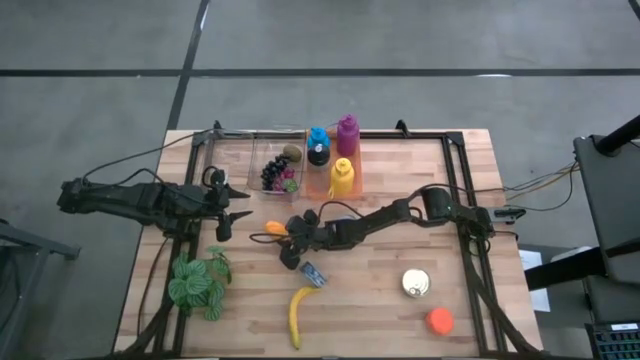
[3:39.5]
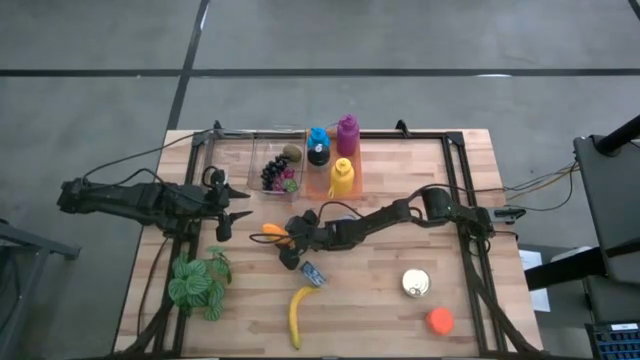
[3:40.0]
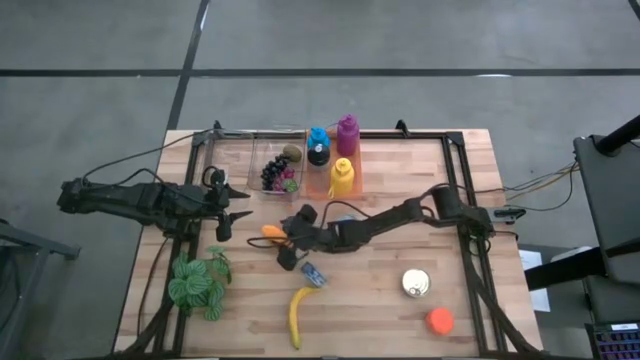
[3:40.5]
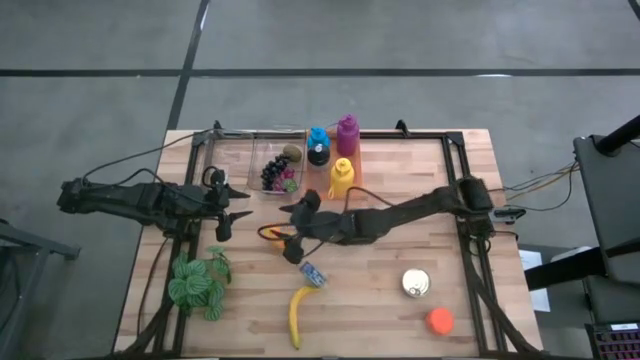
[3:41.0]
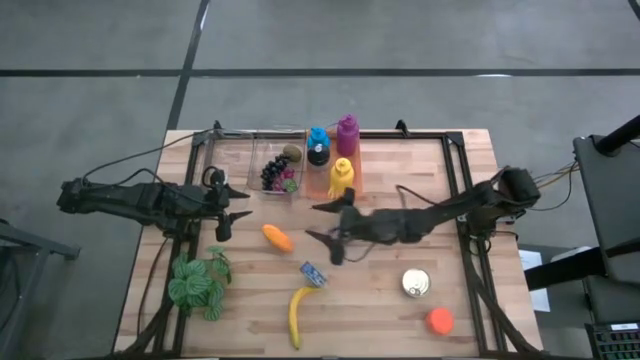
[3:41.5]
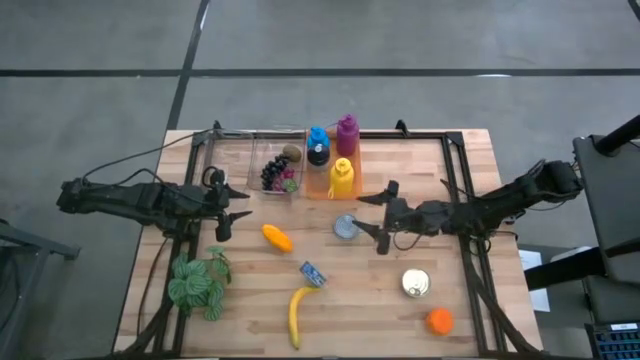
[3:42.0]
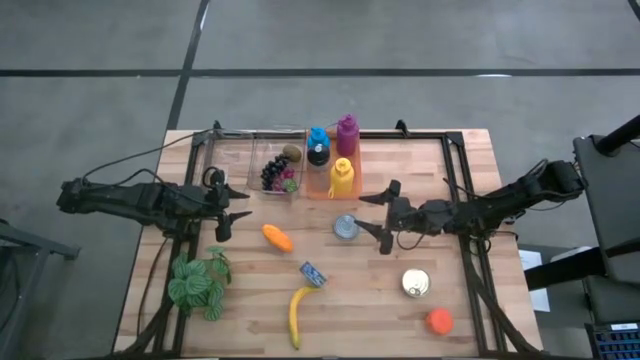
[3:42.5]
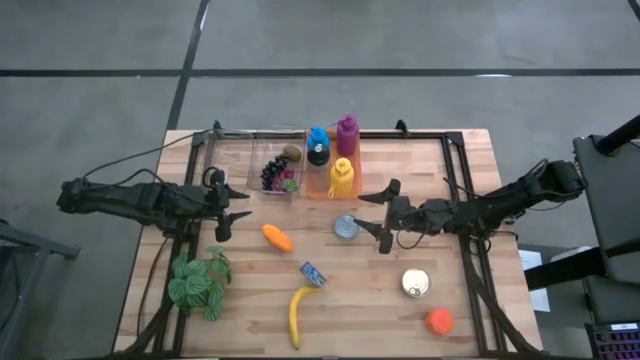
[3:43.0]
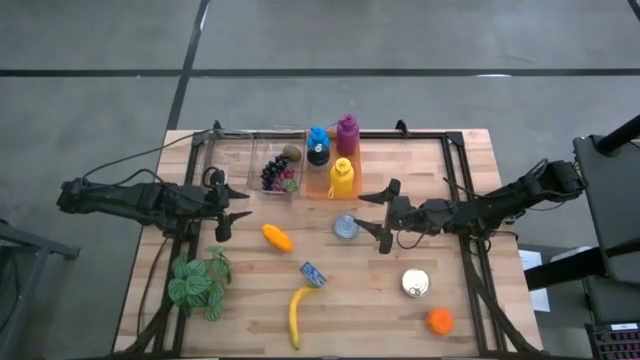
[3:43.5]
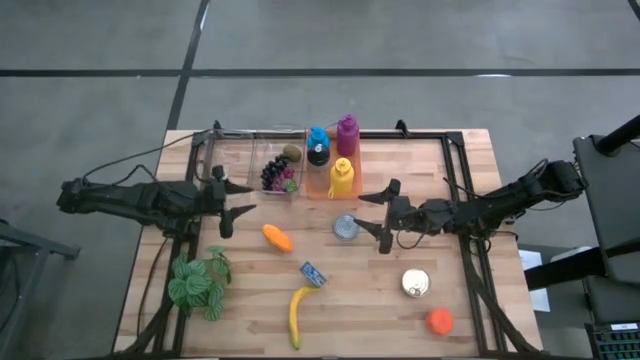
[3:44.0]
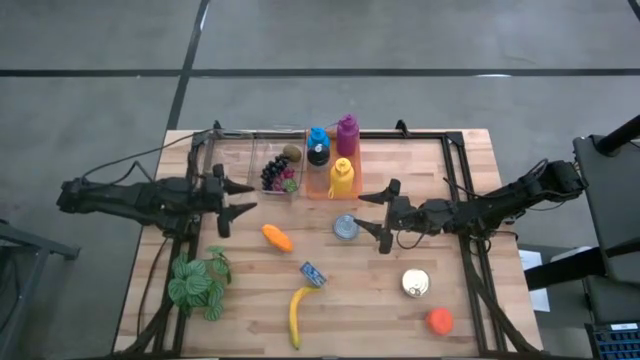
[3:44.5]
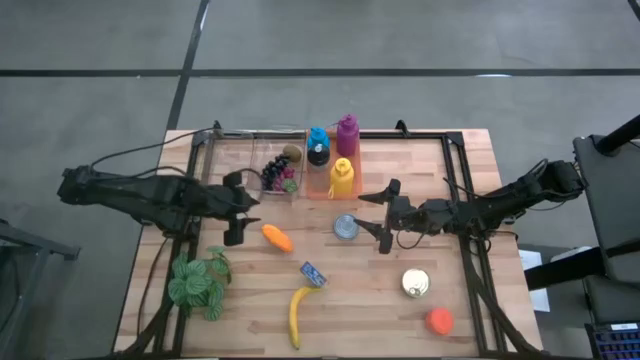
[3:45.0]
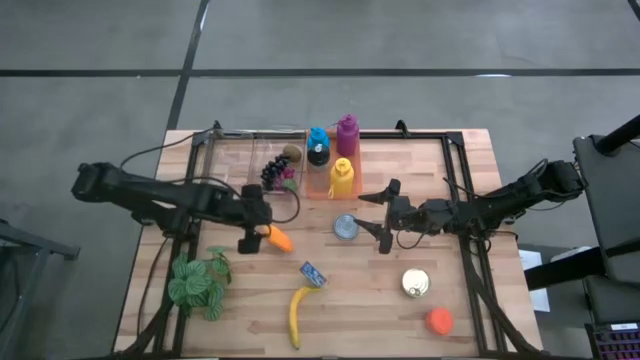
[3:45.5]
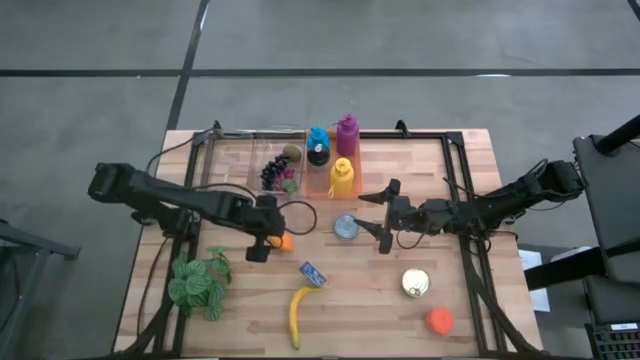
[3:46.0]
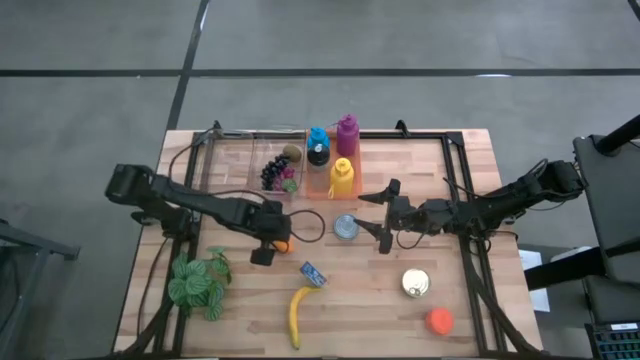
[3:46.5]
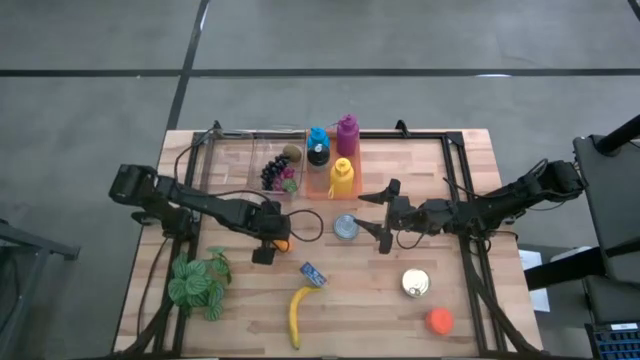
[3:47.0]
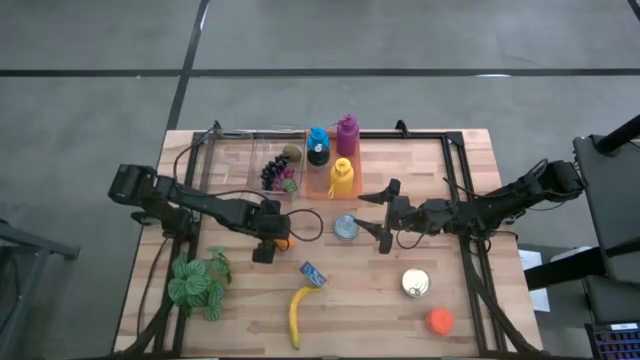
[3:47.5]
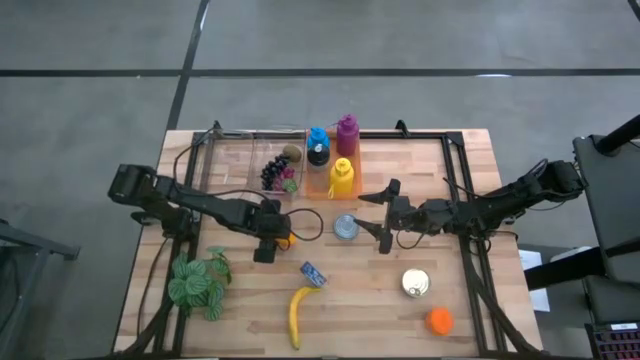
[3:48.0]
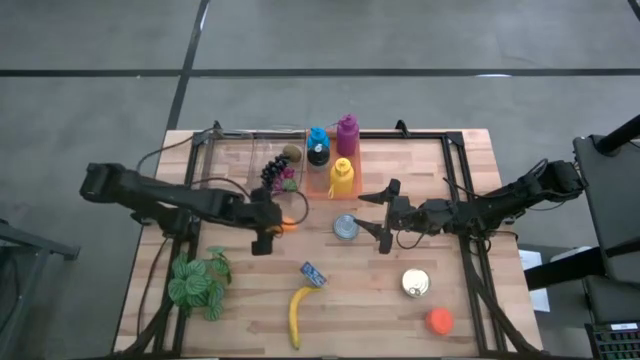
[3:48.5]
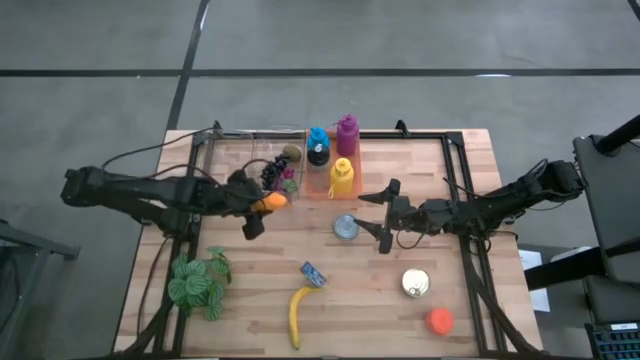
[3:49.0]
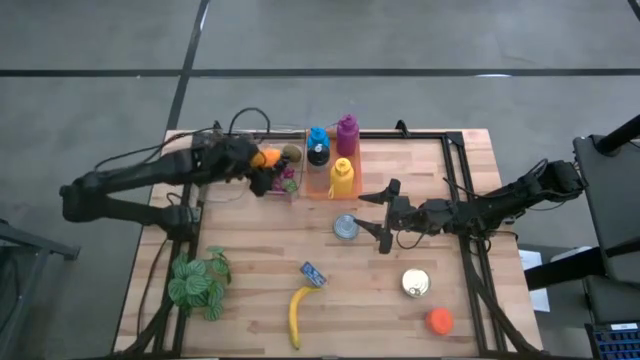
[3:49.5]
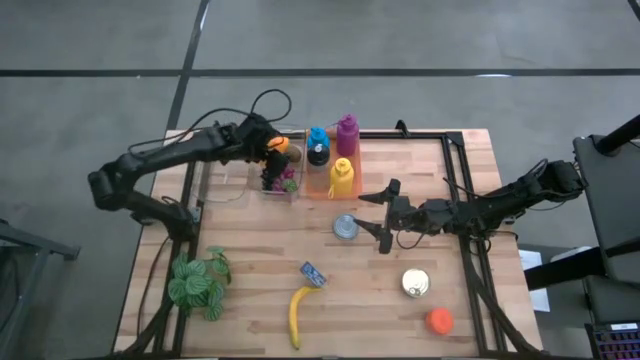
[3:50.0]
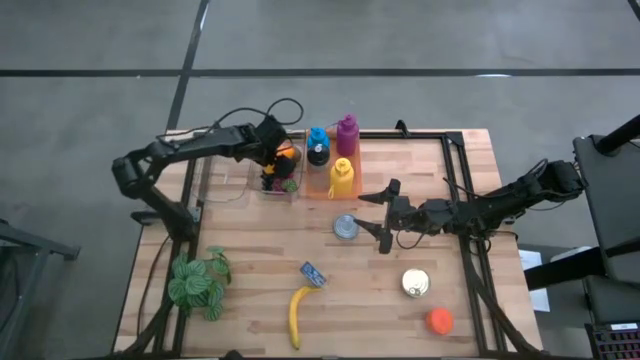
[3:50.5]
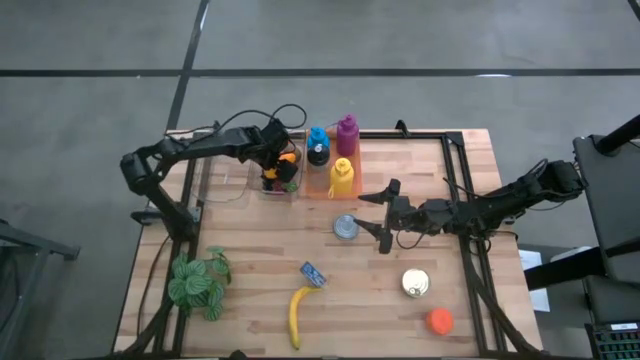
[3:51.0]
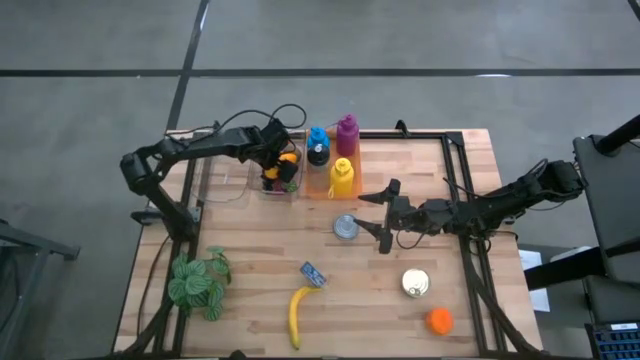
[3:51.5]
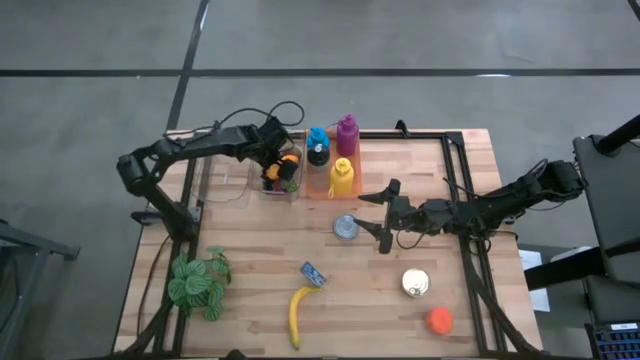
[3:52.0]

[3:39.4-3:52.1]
Task: Pick & Place Food Item
Put the yellow mango into the right transparent bin
